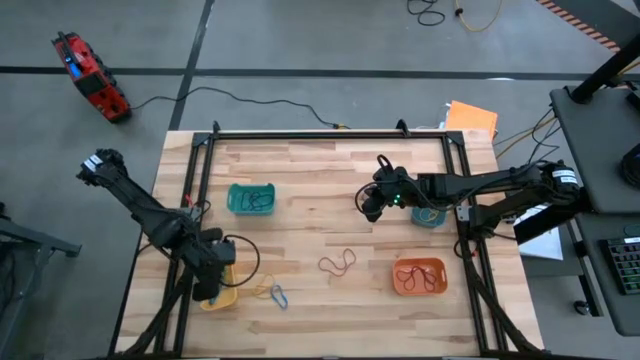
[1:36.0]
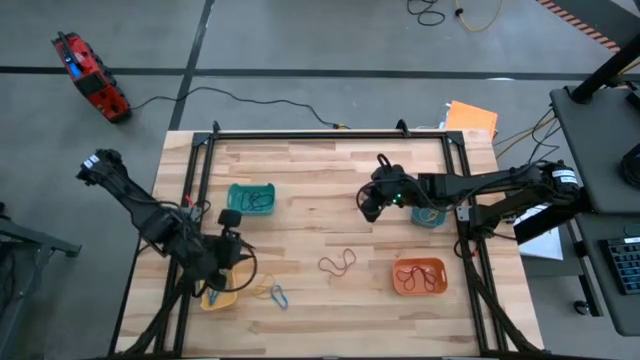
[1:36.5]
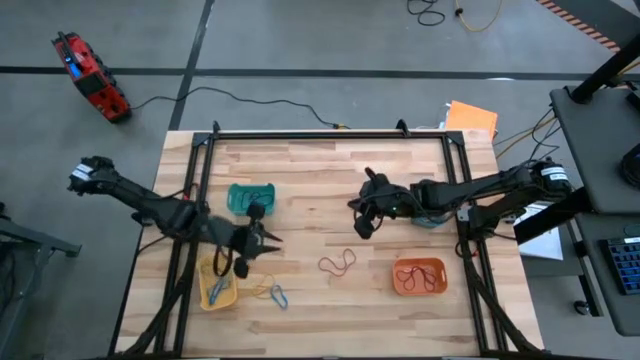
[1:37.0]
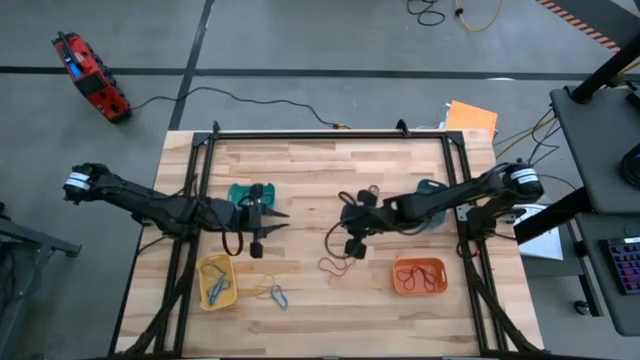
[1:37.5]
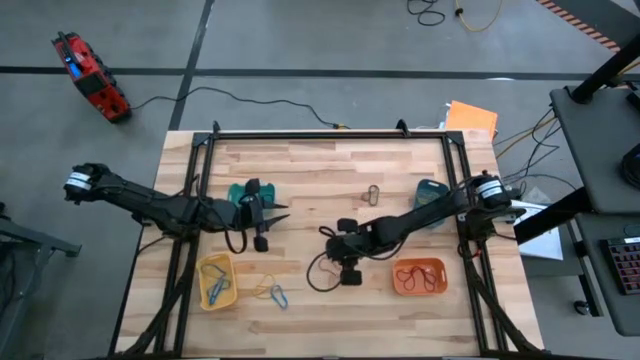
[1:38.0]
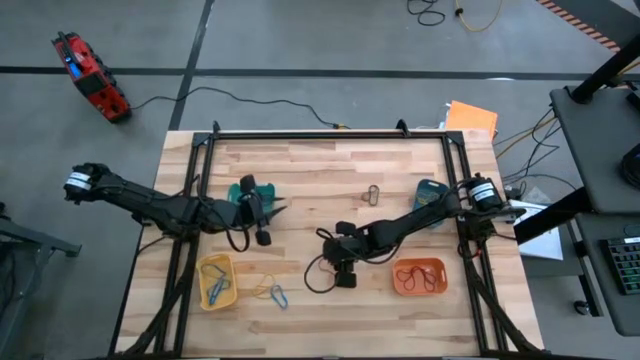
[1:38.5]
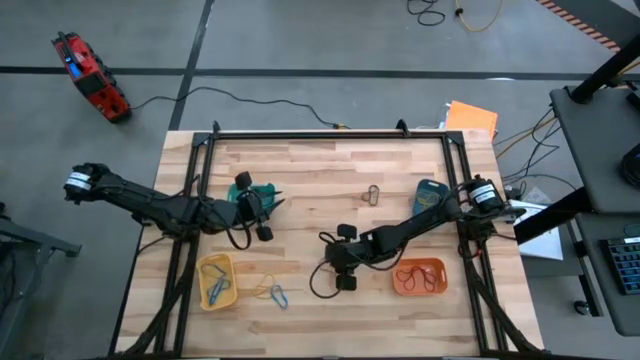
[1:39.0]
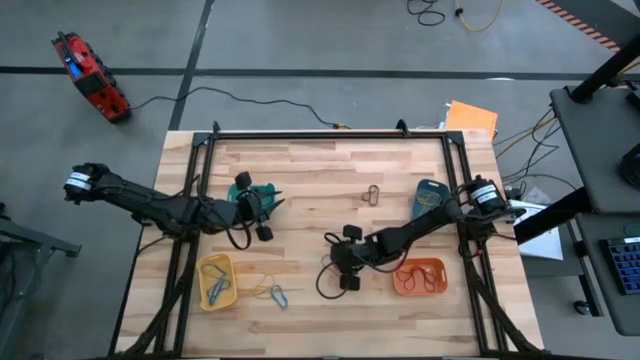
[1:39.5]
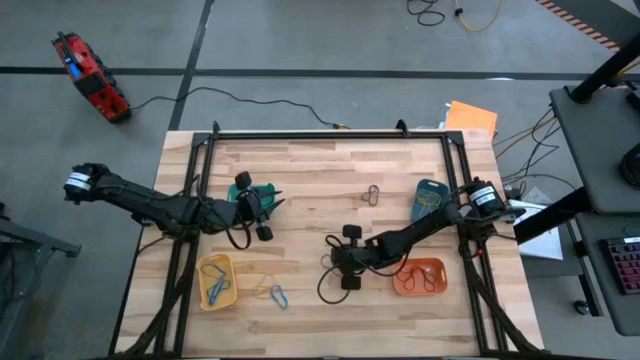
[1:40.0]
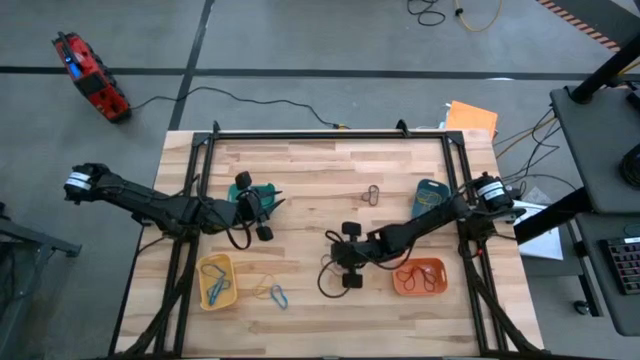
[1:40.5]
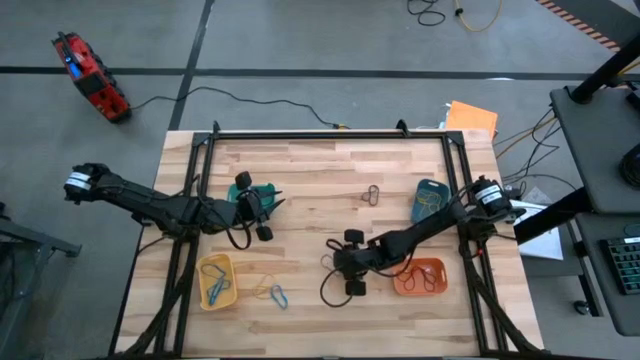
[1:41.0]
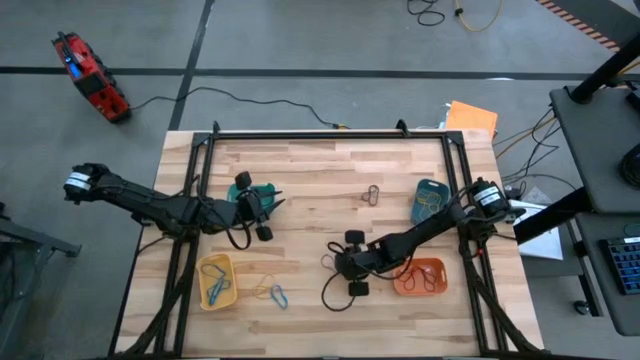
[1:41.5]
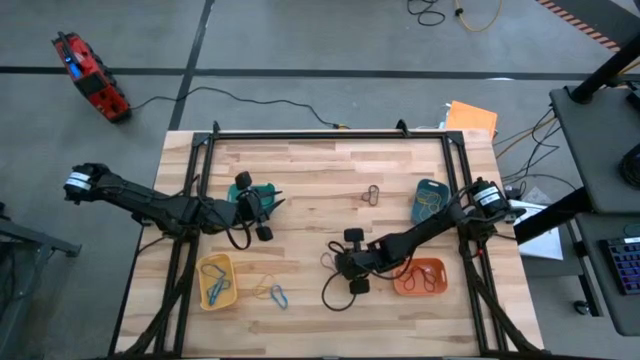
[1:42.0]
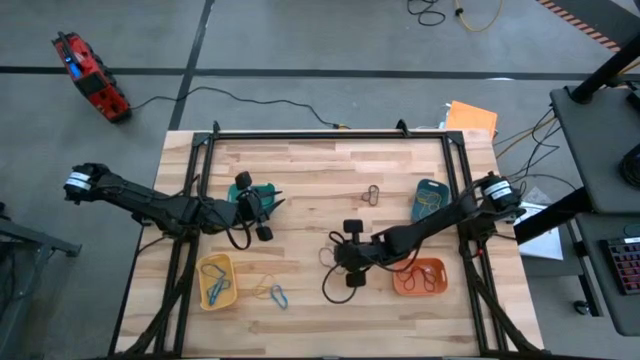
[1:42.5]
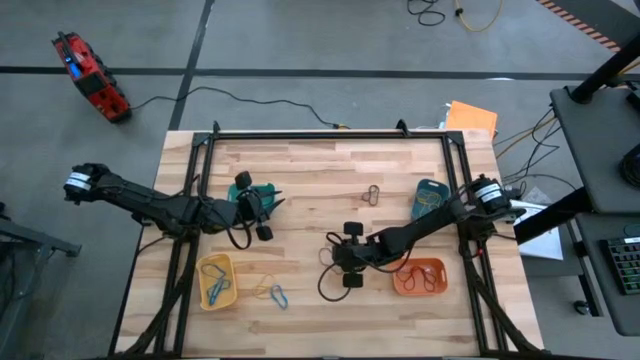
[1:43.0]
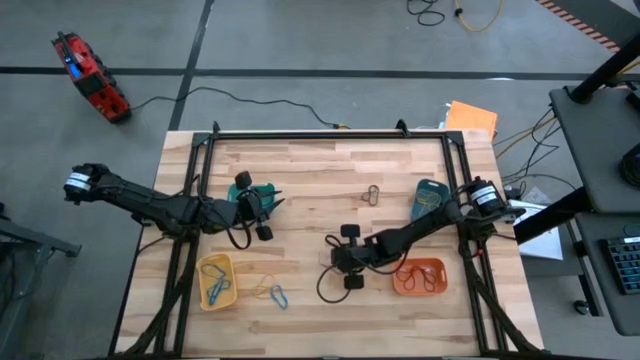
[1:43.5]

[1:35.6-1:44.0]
Task: Sort rubber bands into baskets
Put the red rubber band into the orange bin

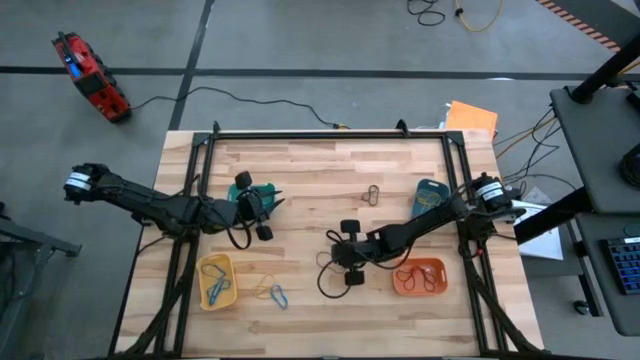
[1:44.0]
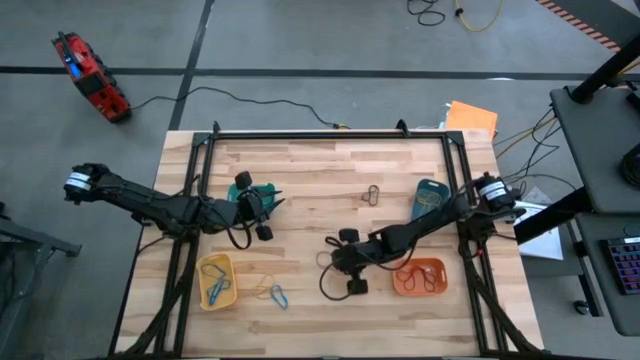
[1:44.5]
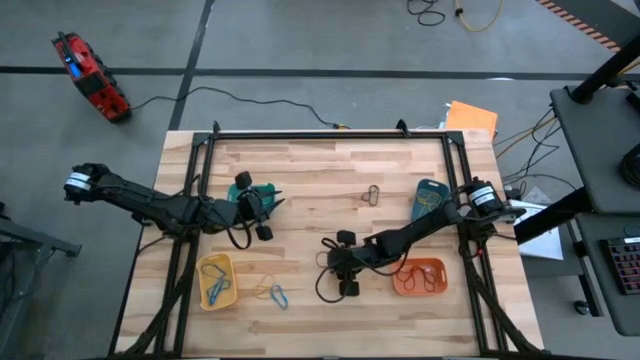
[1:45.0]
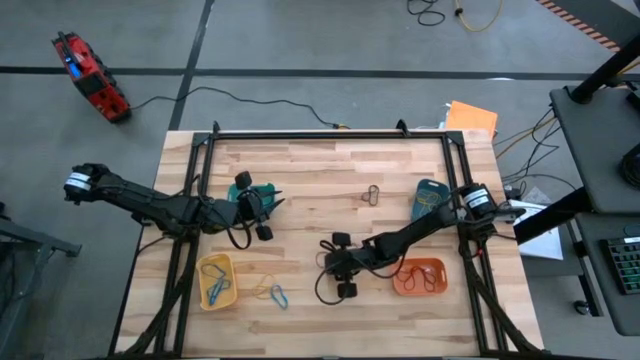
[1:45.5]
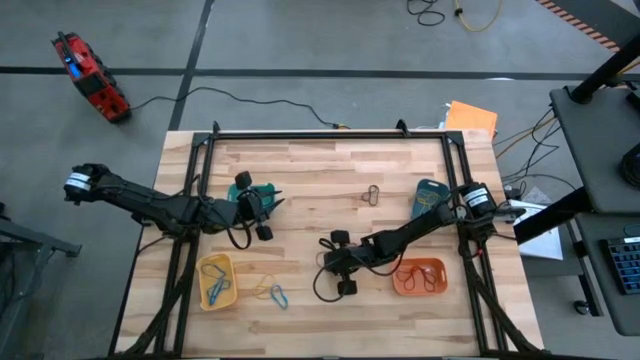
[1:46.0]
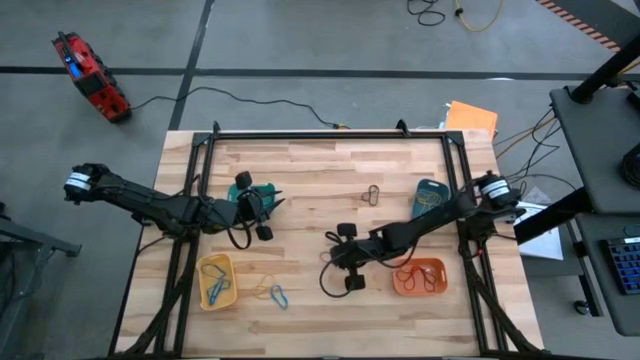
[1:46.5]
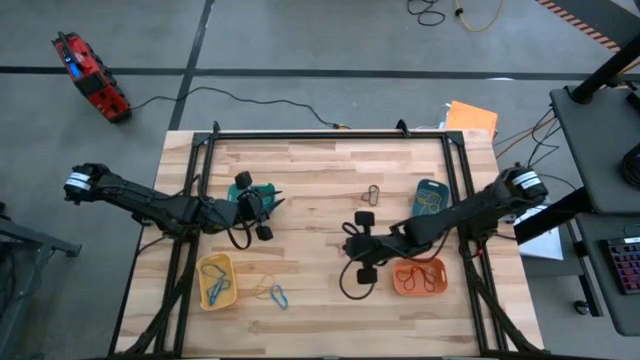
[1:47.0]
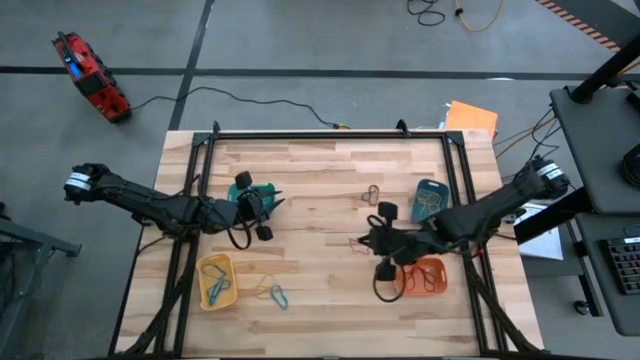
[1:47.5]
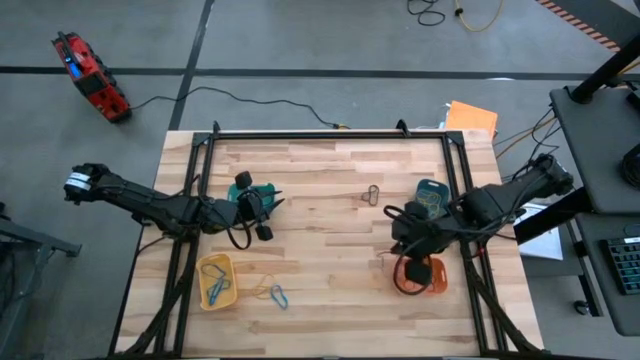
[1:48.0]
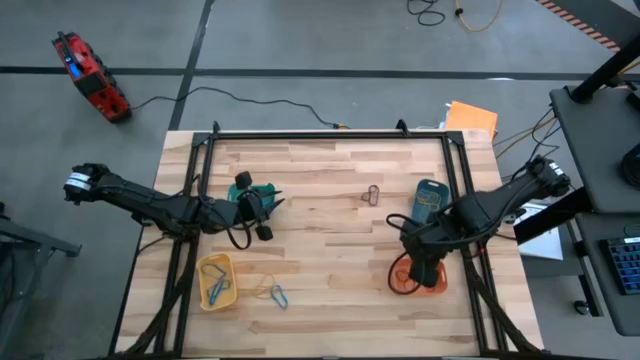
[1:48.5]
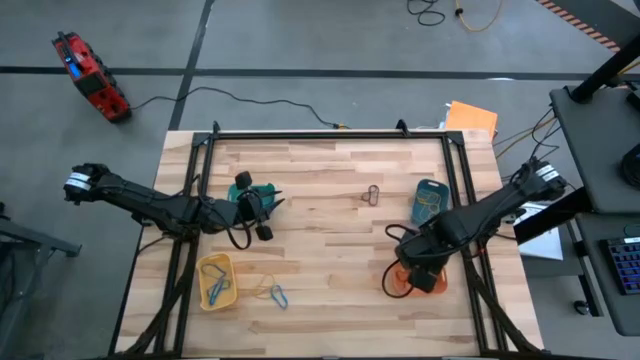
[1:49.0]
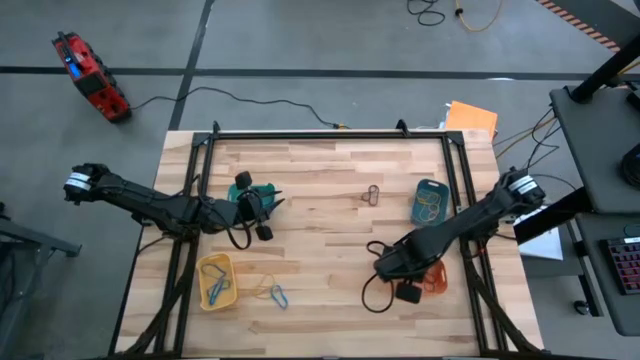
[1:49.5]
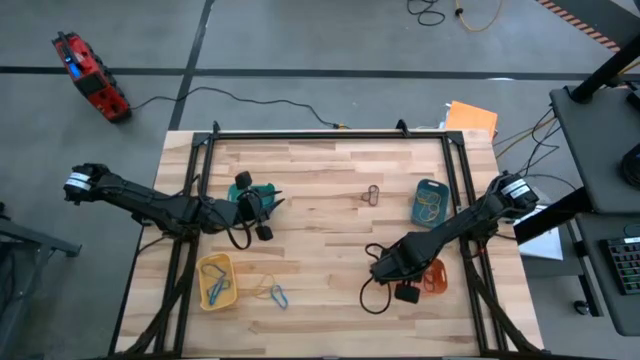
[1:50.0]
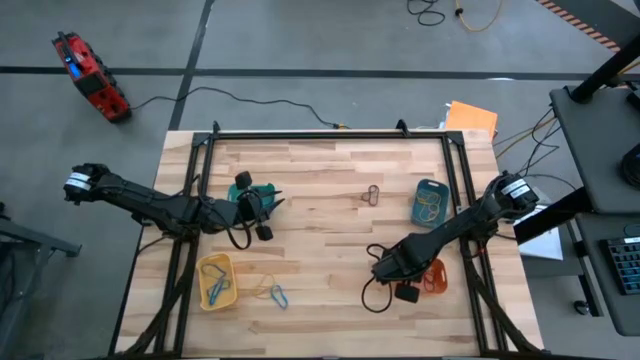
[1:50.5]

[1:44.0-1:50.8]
Put the red rubber band into the orange bin

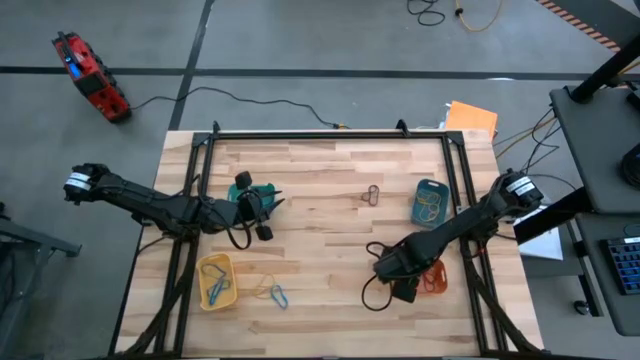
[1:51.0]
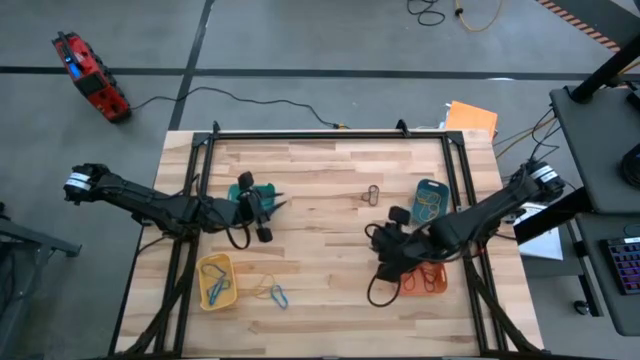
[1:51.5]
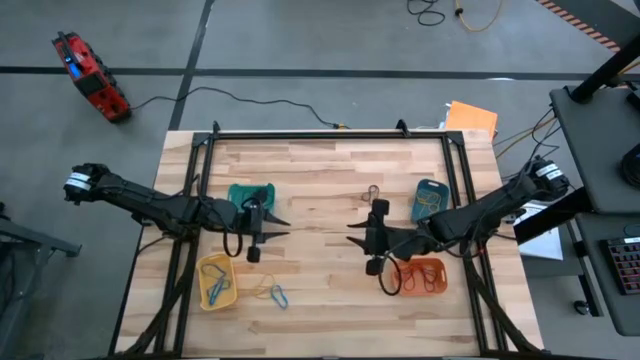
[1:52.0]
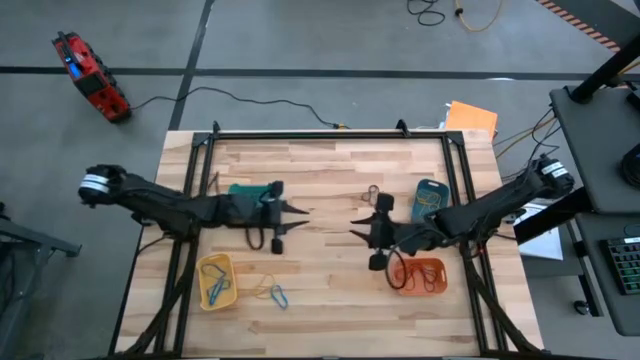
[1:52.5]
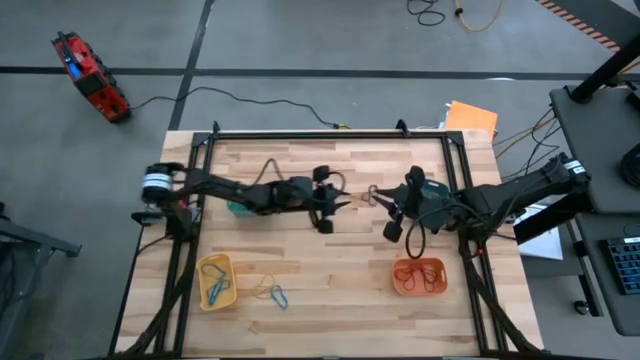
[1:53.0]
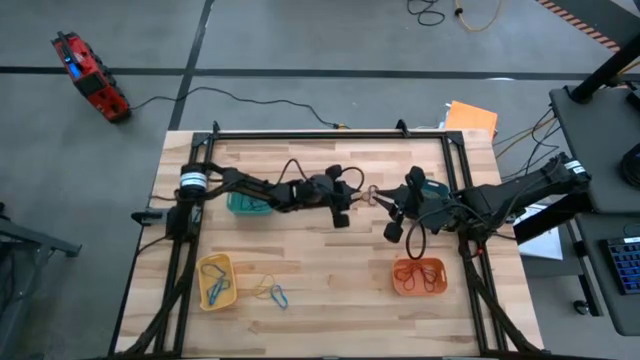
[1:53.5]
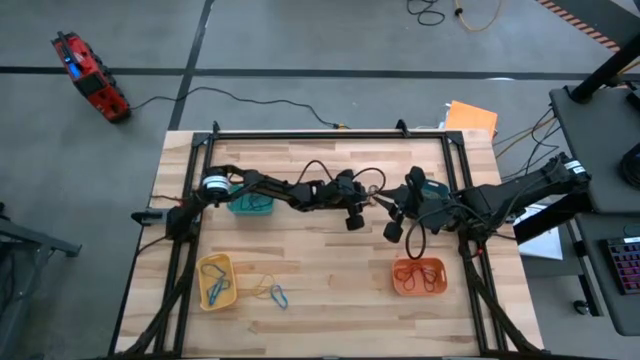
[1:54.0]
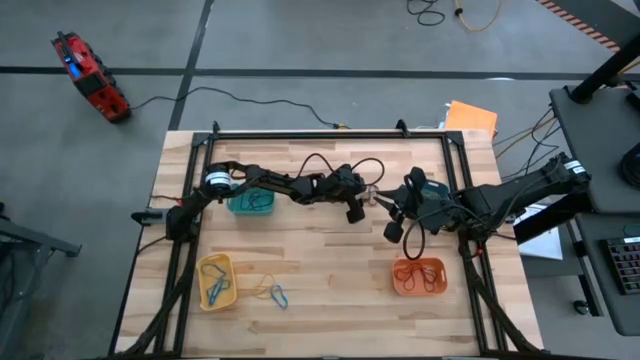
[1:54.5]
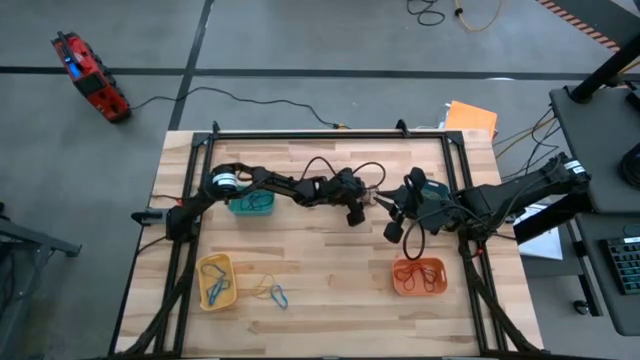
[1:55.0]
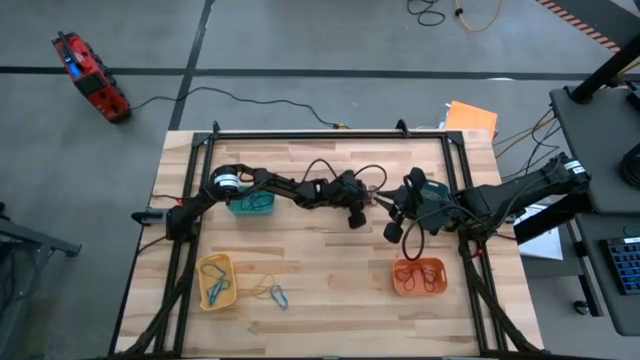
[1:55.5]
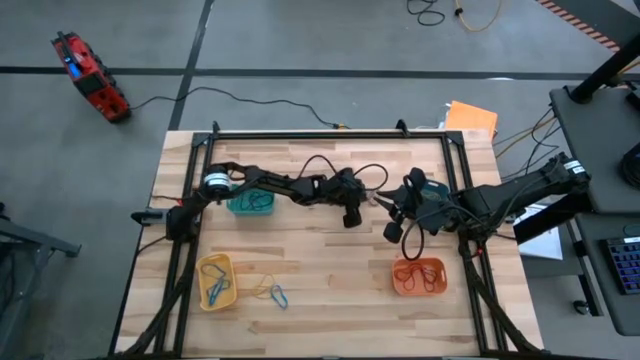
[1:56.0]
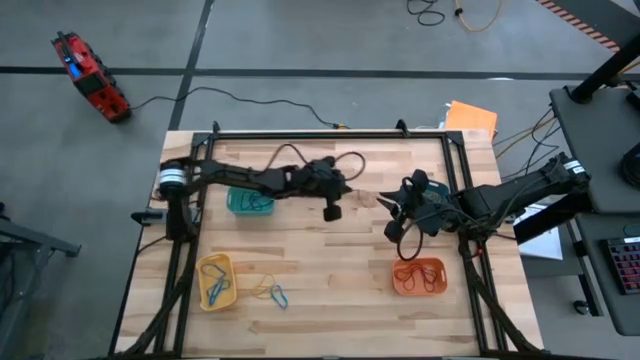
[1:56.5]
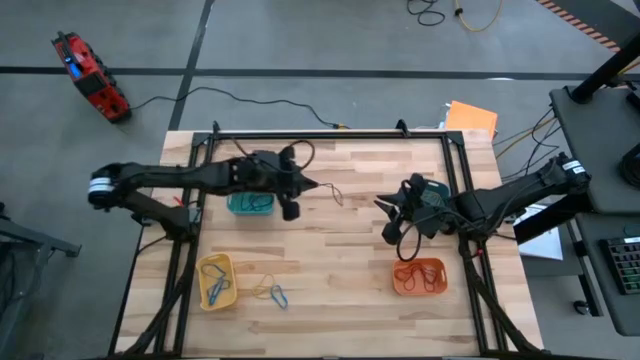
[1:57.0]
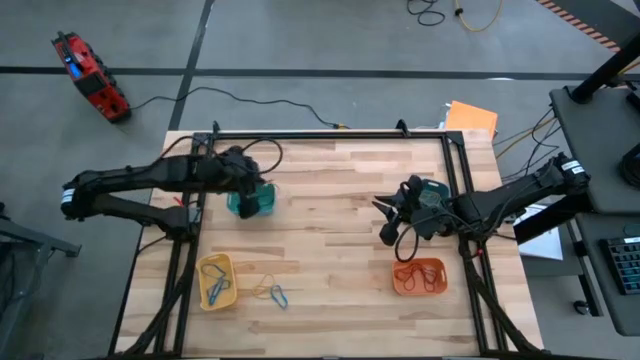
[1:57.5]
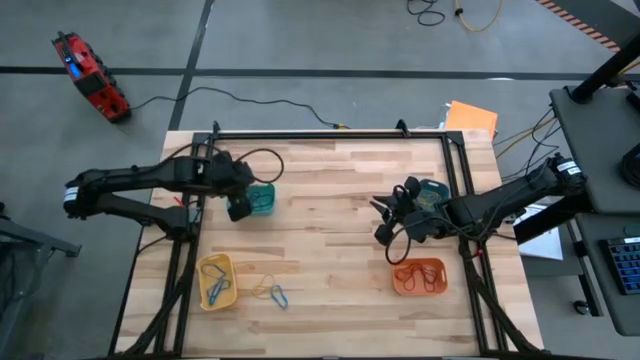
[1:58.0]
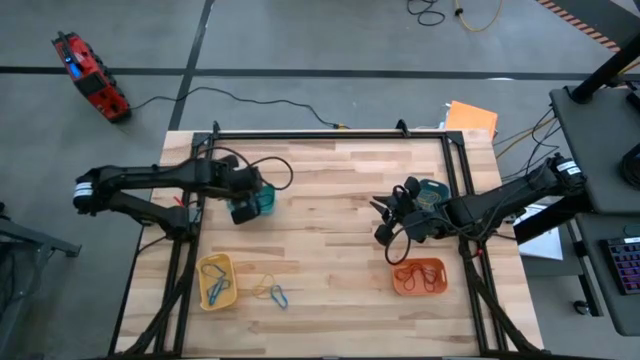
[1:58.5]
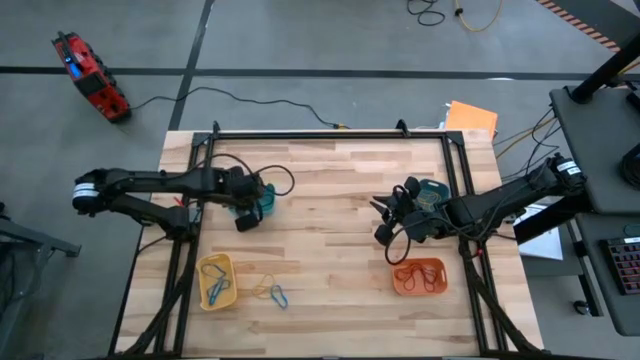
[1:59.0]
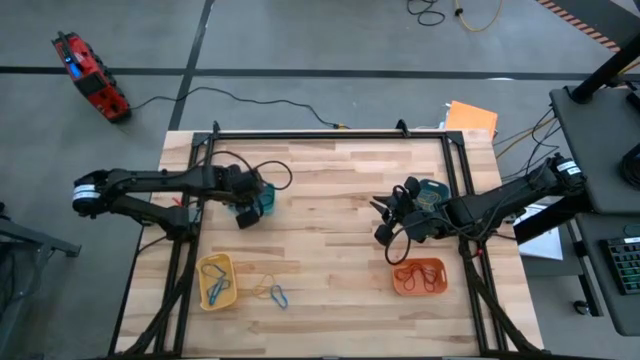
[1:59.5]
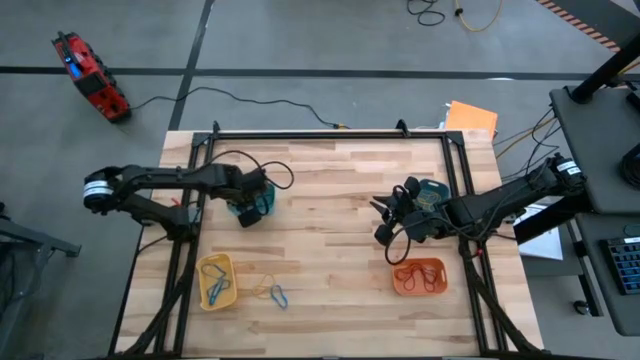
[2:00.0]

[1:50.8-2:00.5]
Put the brown rubber band into the green bin
